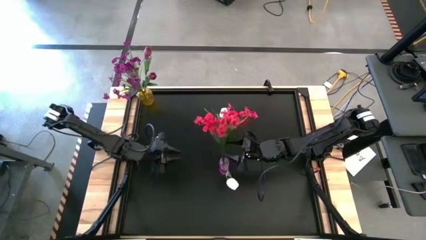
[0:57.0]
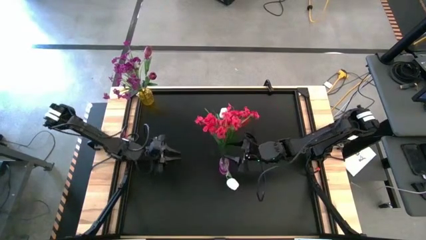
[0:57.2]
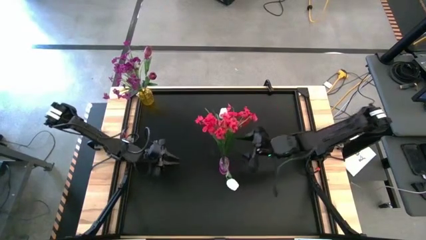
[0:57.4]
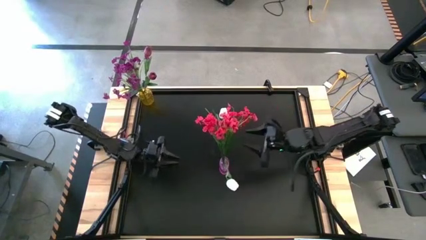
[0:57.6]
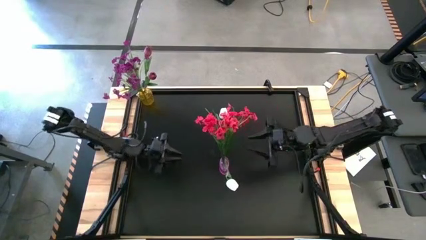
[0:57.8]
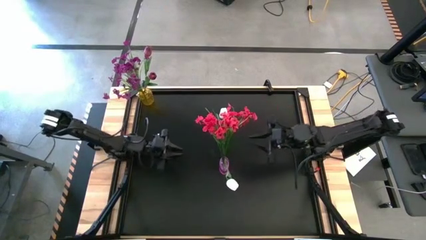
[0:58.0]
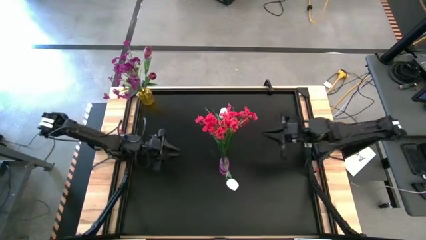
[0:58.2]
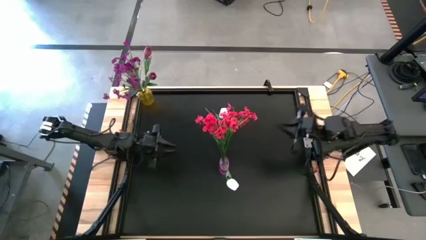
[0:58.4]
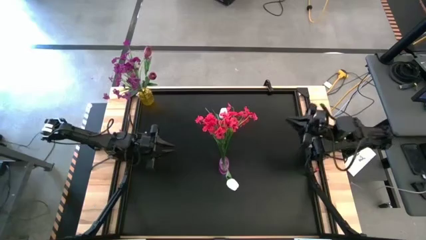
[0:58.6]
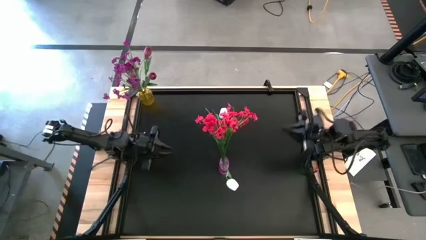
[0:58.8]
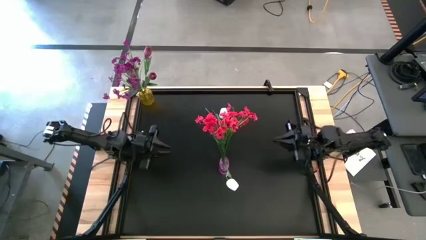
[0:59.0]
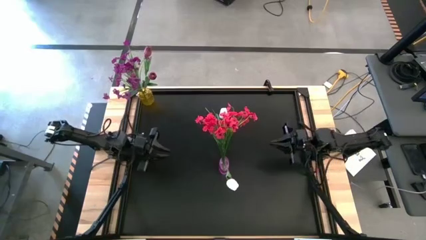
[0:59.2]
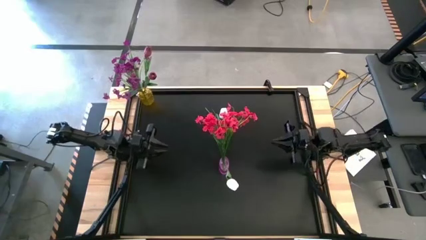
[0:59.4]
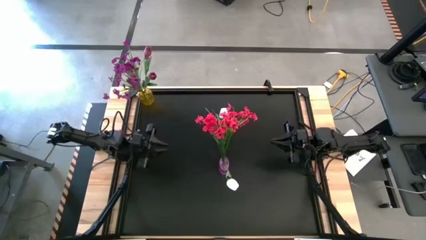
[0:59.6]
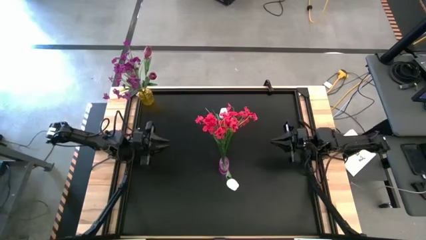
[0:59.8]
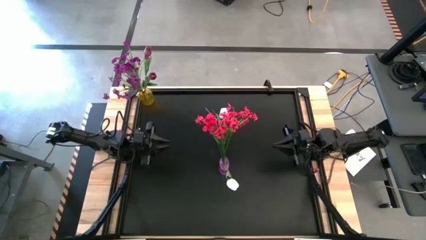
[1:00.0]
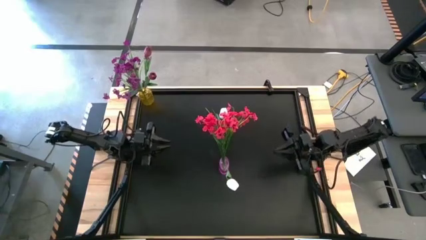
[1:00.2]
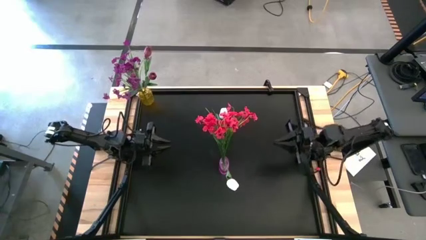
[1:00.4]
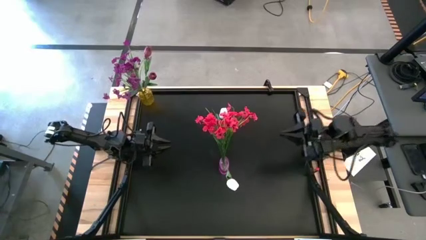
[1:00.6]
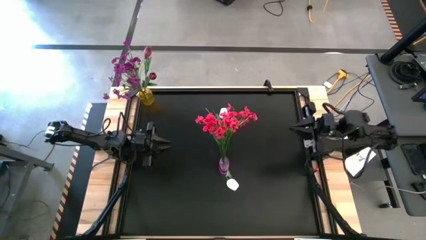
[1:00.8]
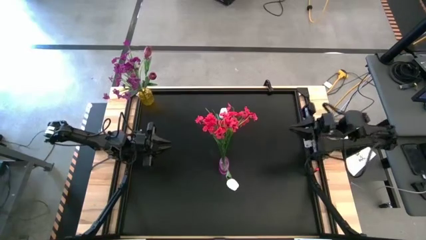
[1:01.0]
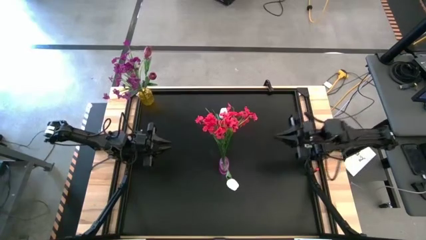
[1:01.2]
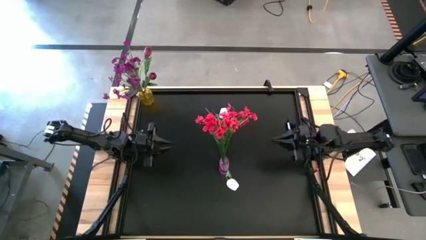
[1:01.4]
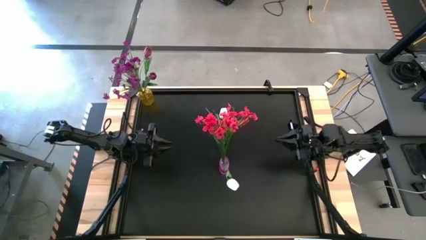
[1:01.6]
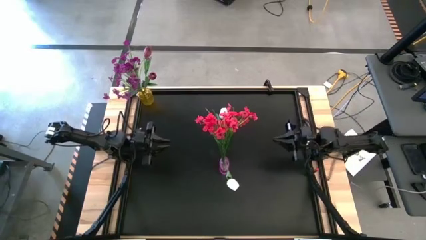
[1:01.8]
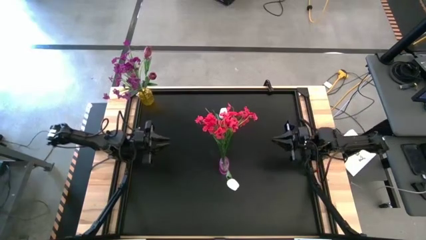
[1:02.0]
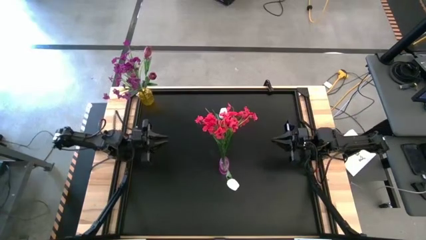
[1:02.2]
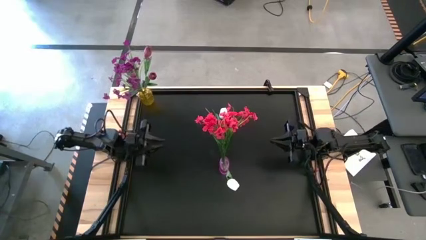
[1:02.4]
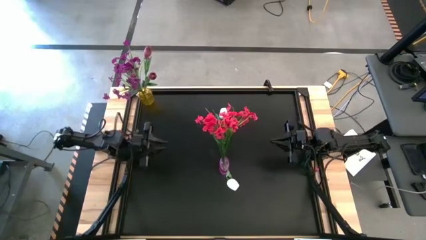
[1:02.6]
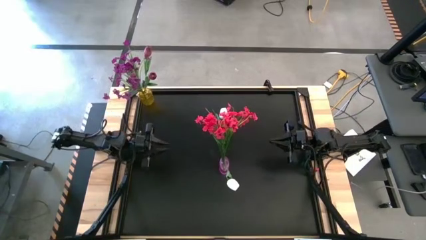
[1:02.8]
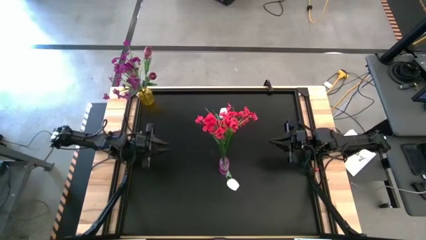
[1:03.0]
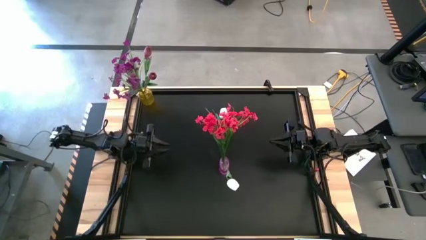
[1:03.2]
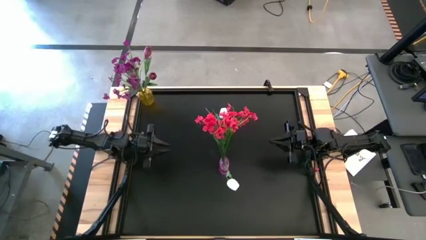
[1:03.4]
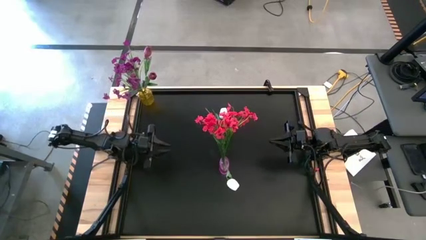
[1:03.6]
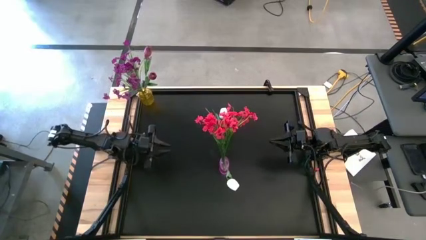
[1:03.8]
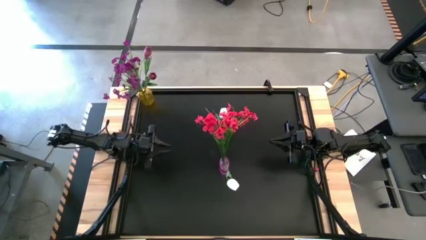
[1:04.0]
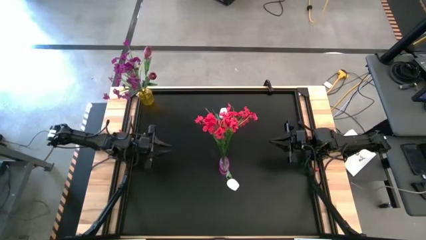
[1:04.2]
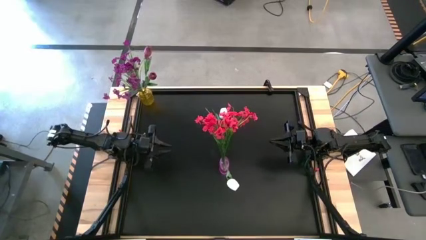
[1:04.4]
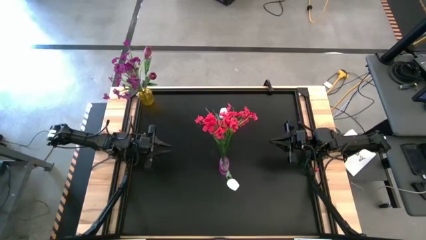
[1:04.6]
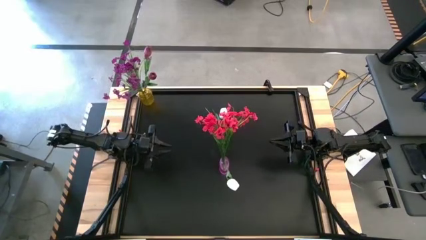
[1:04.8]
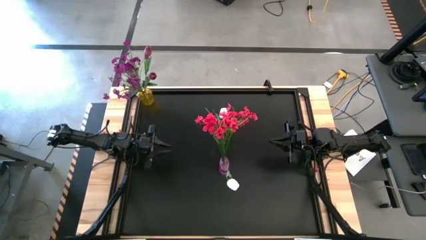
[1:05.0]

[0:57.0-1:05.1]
Task: Sort flowers into vase by color
Return to Home Position

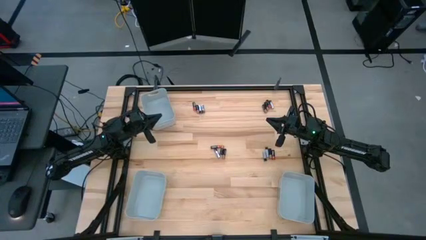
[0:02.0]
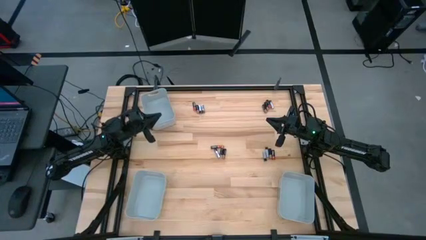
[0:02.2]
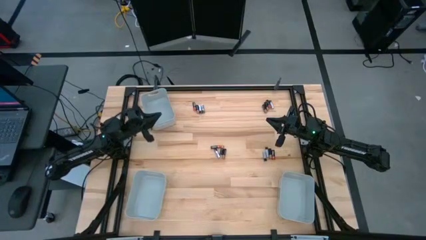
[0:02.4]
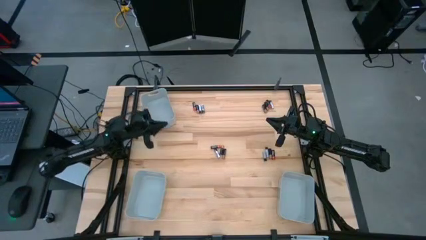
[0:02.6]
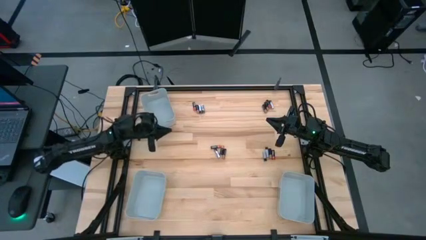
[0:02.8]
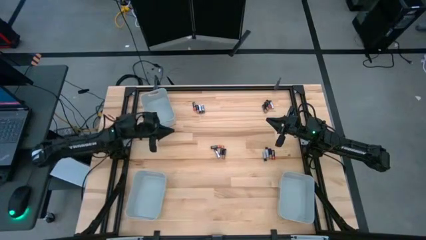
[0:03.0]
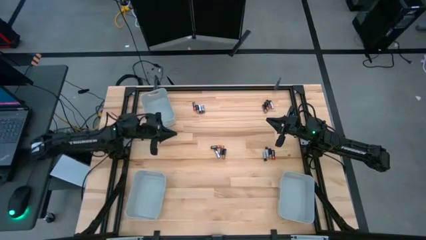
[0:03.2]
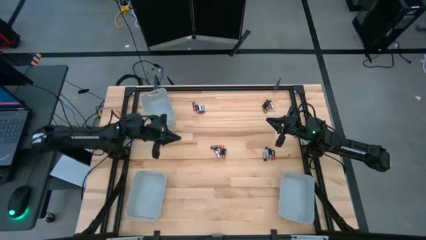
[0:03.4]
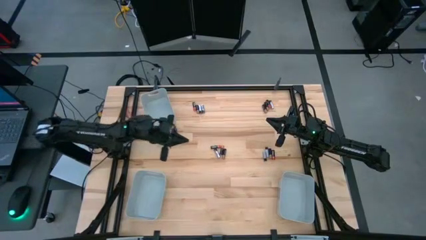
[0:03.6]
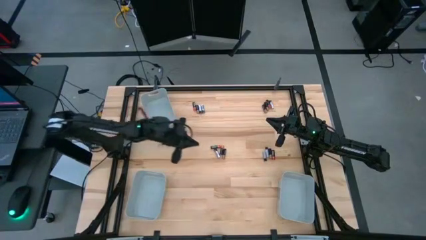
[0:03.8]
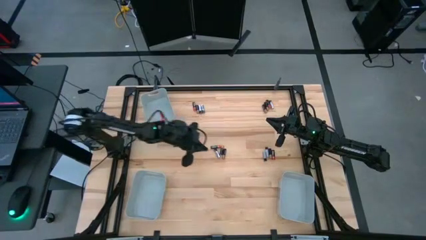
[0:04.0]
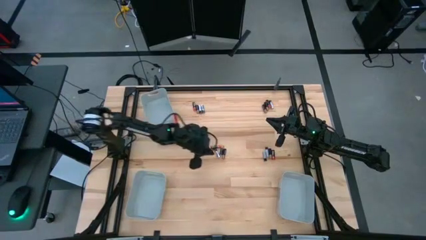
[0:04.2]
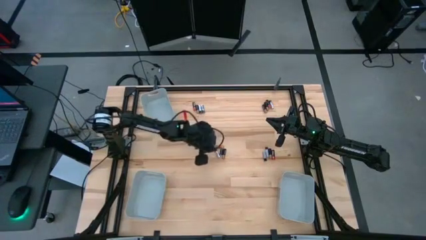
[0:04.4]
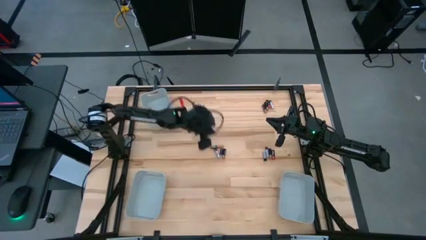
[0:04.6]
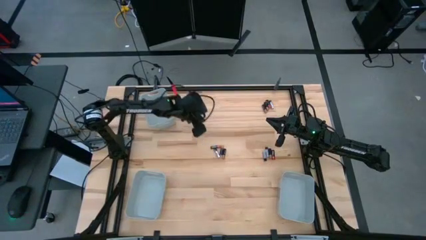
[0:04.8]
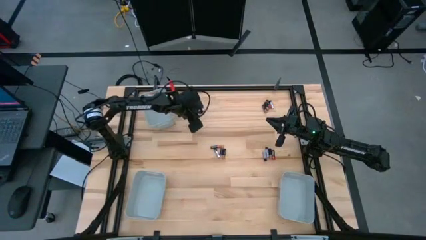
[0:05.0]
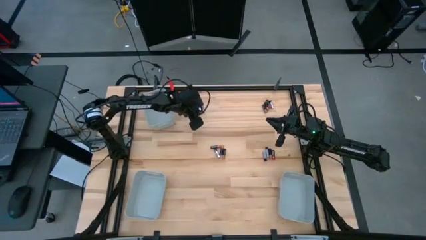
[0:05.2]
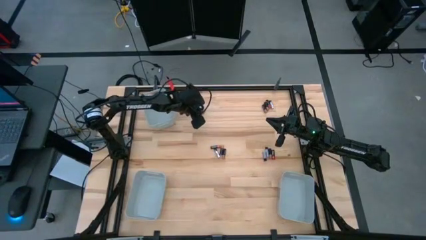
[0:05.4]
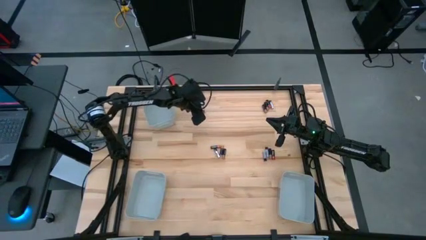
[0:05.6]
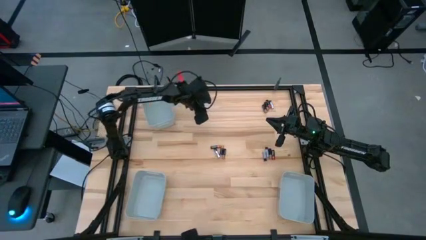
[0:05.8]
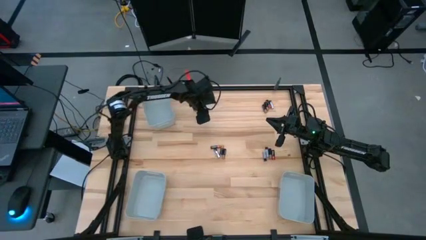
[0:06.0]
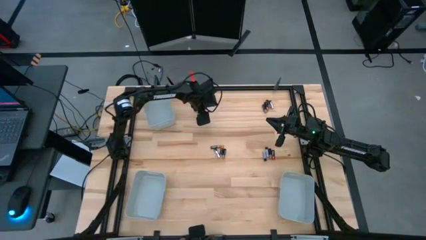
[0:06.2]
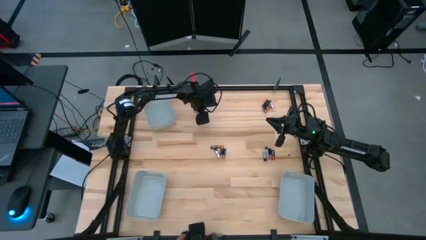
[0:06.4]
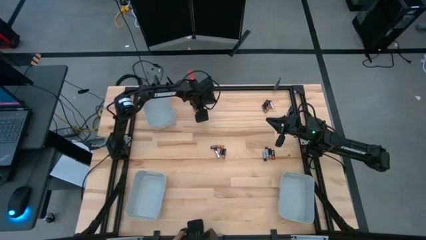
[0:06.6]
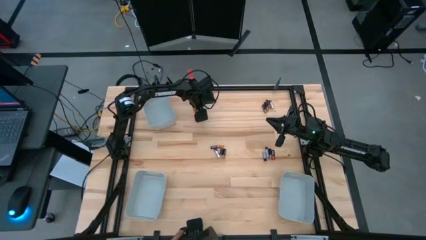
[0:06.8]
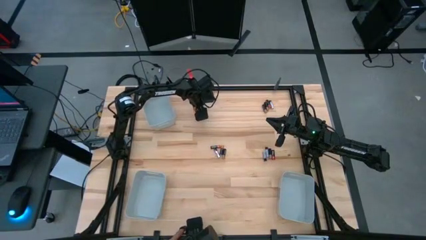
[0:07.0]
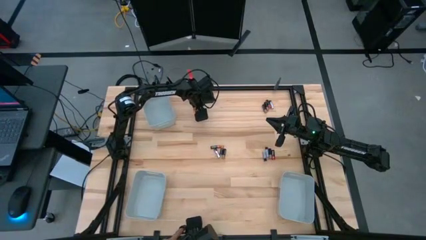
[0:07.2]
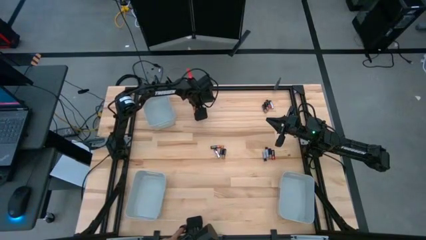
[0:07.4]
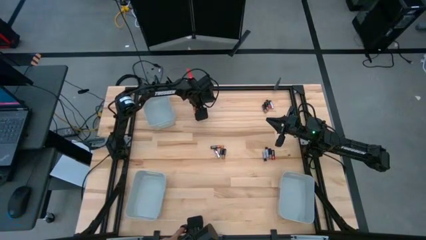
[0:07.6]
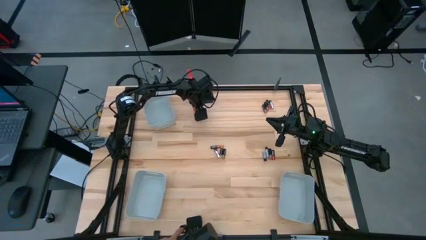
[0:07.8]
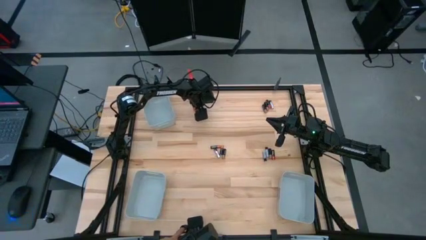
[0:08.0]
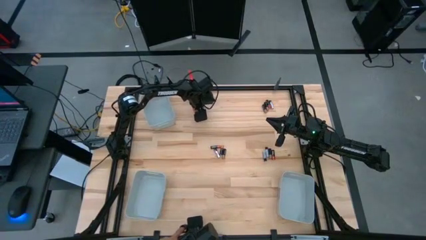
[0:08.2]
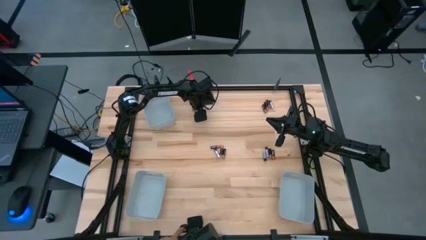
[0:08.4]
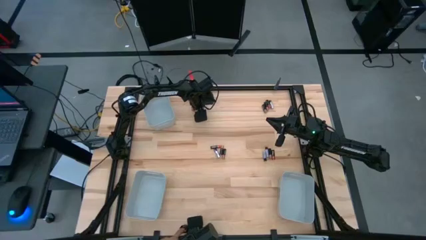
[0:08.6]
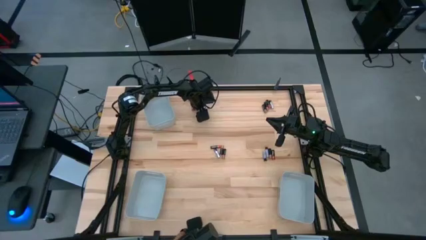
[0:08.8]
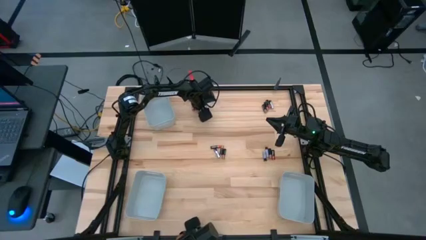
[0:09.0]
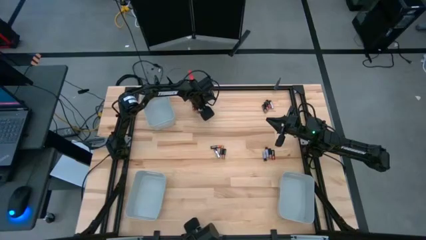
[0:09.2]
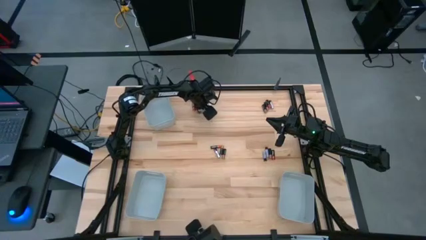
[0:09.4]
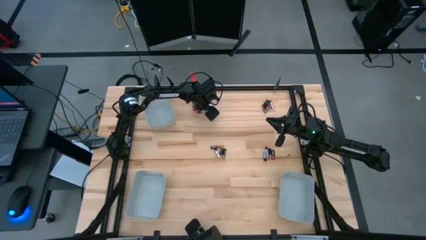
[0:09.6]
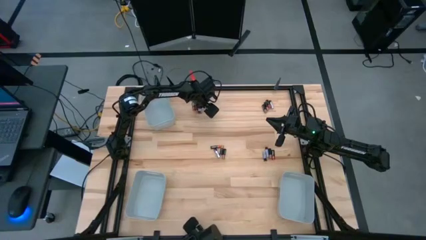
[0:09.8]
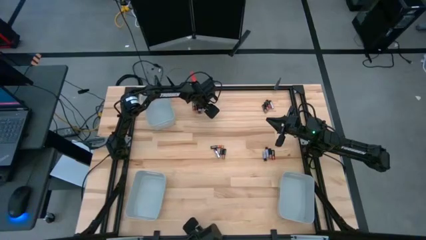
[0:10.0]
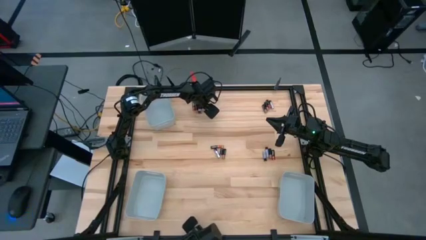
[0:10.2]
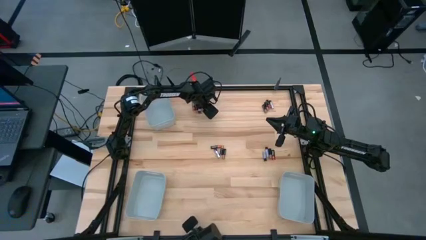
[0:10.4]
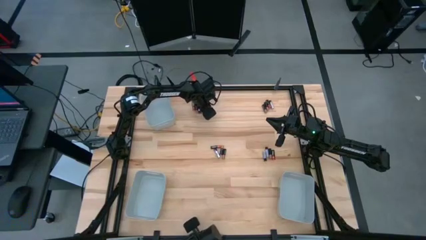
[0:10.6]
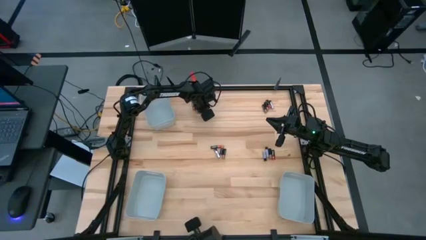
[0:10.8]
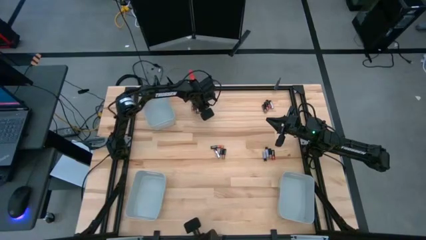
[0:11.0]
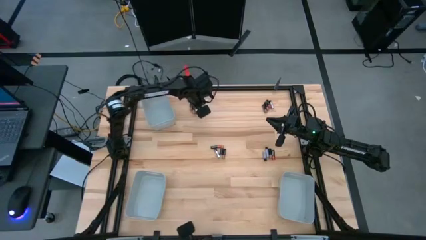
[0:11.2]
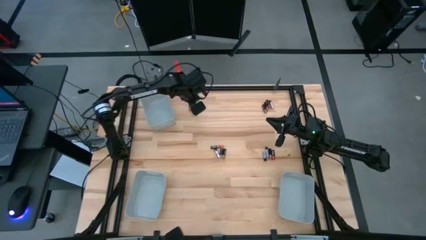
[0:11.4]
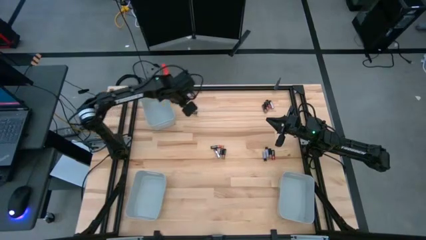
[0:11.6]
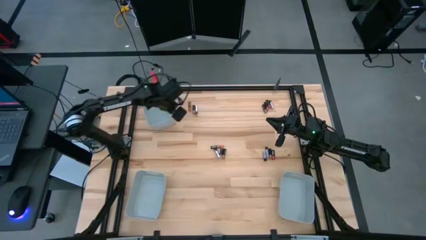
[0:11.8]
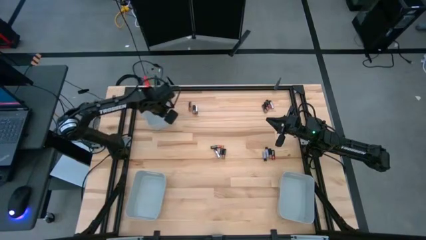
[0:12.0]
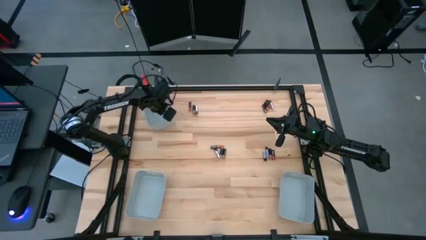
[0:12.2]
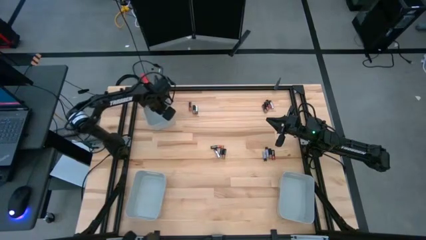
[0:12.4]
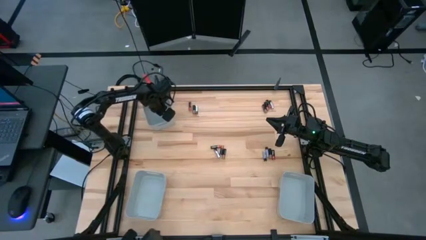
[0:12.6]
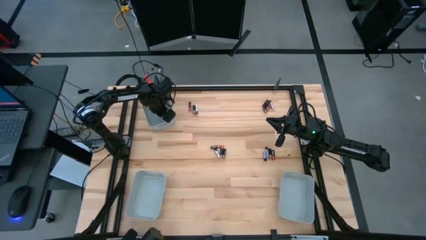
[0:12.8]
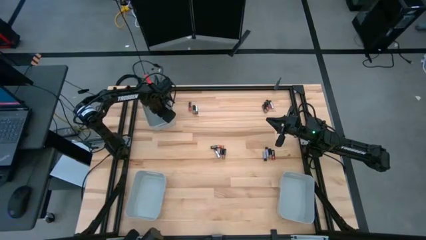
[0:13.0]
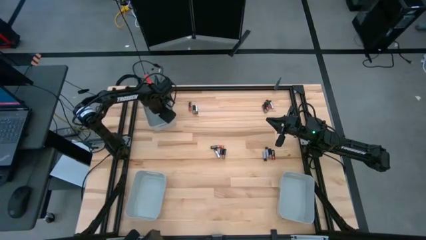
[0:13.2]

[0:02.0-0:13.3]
Task: Sort batteries
Put the silver battery into the top left gray bin
